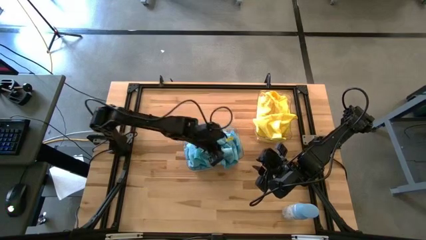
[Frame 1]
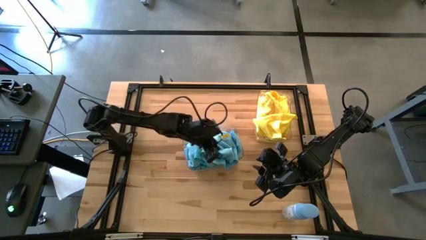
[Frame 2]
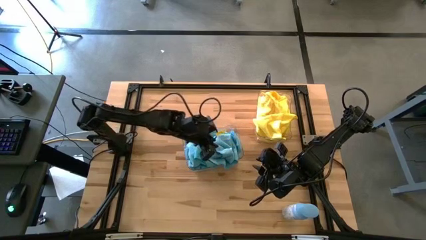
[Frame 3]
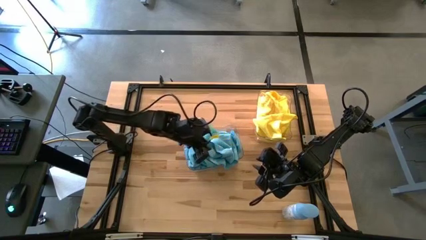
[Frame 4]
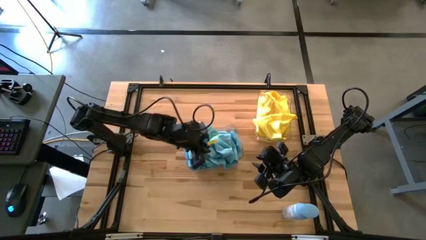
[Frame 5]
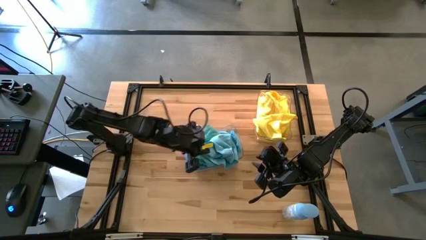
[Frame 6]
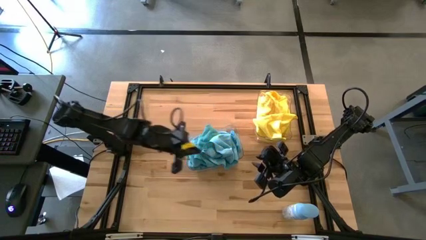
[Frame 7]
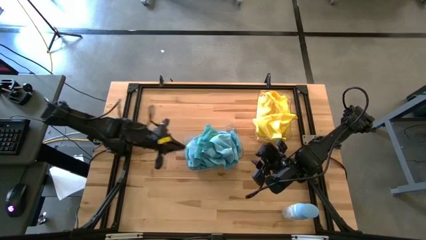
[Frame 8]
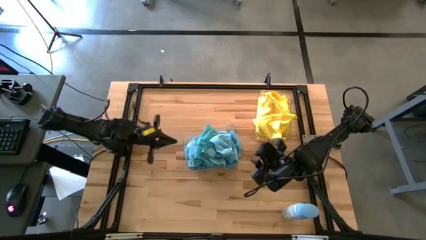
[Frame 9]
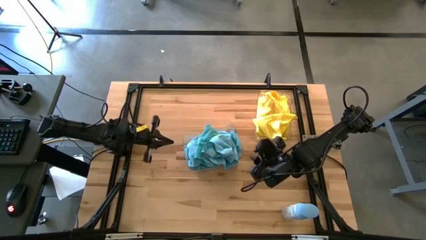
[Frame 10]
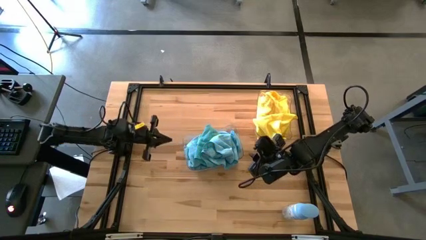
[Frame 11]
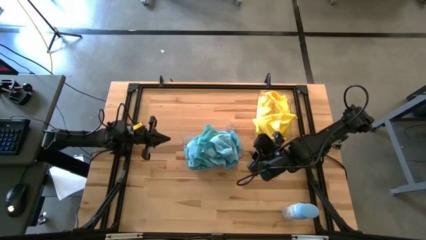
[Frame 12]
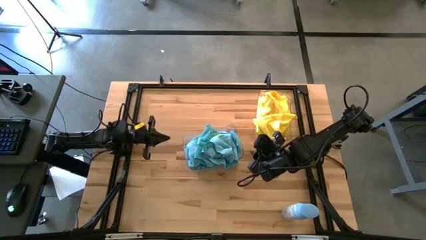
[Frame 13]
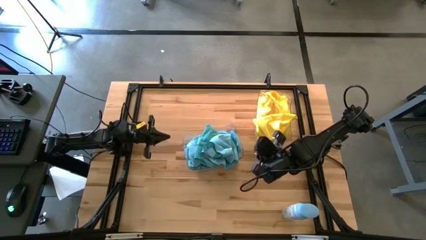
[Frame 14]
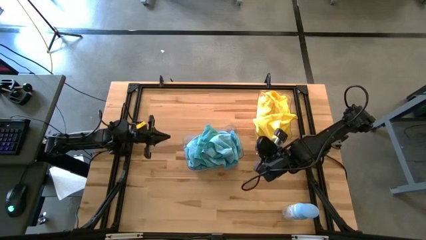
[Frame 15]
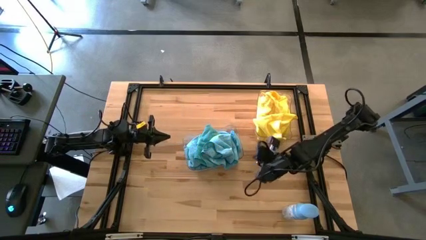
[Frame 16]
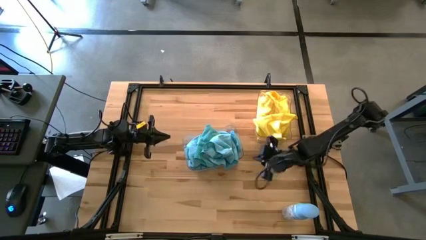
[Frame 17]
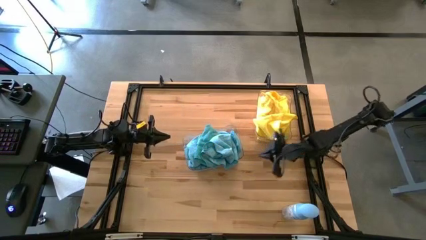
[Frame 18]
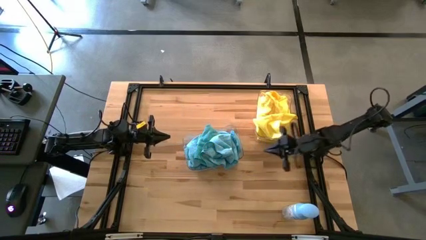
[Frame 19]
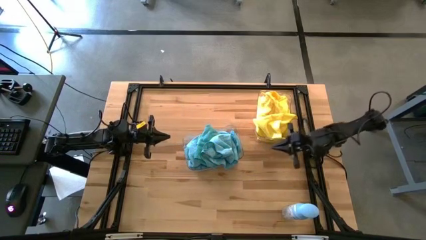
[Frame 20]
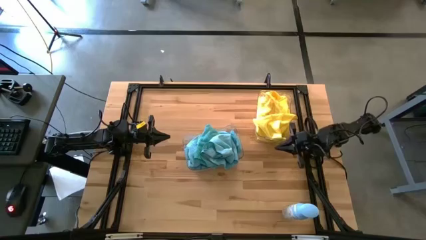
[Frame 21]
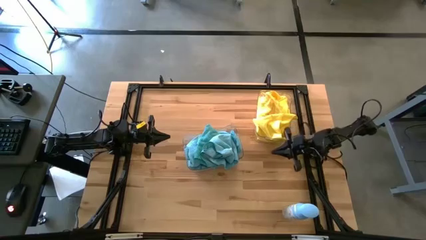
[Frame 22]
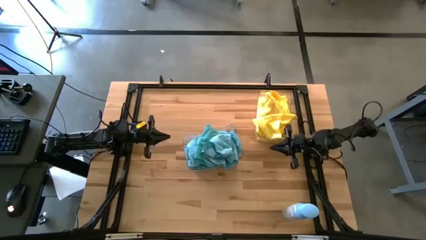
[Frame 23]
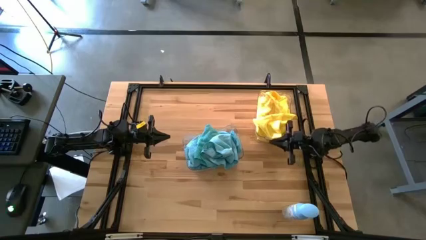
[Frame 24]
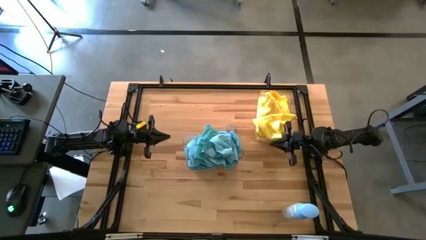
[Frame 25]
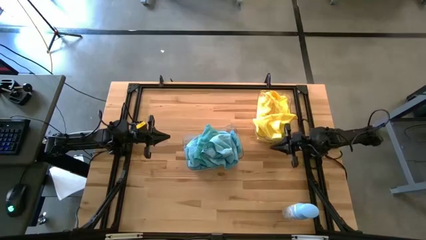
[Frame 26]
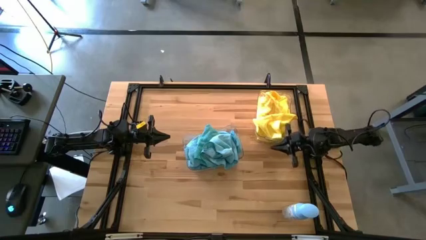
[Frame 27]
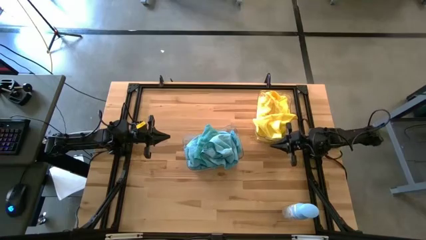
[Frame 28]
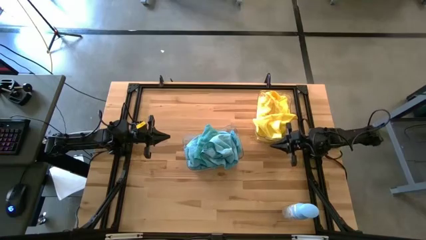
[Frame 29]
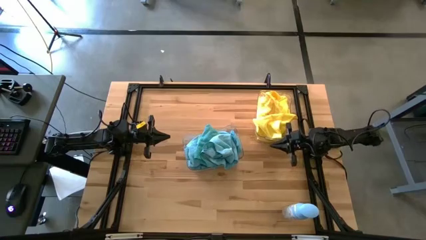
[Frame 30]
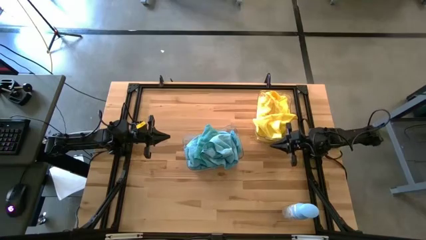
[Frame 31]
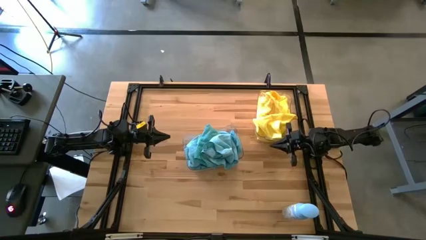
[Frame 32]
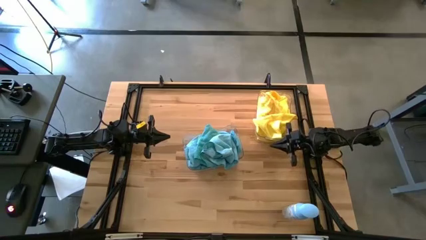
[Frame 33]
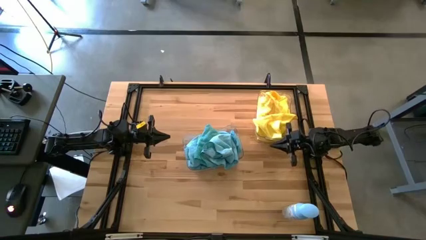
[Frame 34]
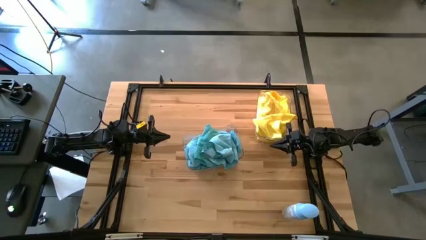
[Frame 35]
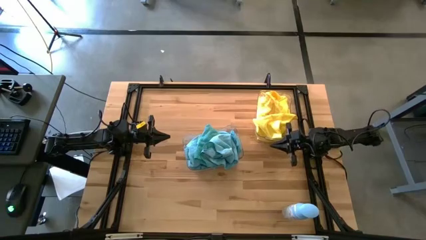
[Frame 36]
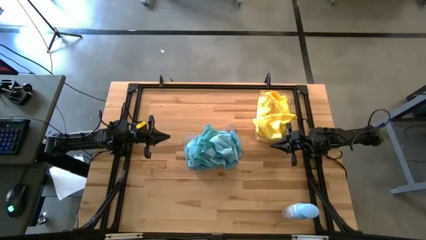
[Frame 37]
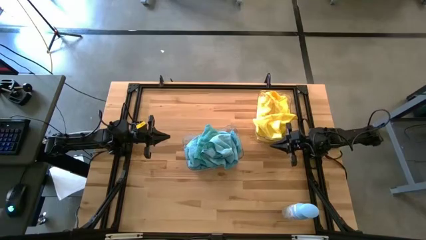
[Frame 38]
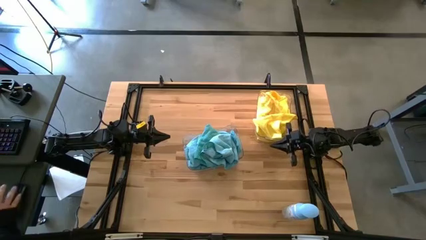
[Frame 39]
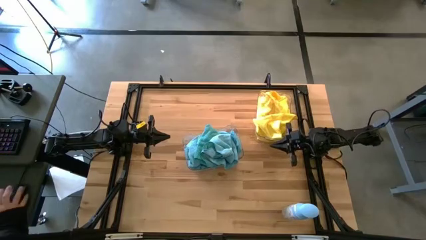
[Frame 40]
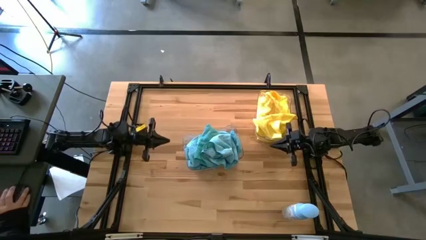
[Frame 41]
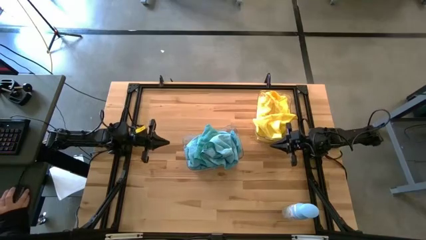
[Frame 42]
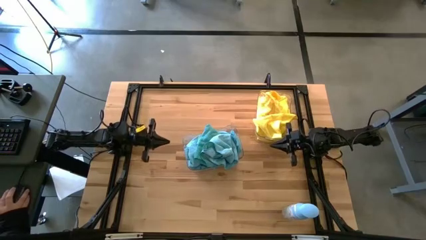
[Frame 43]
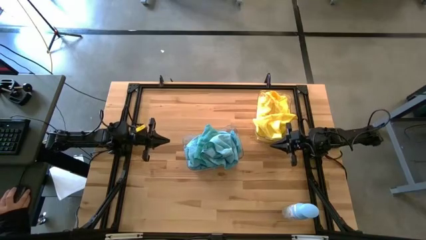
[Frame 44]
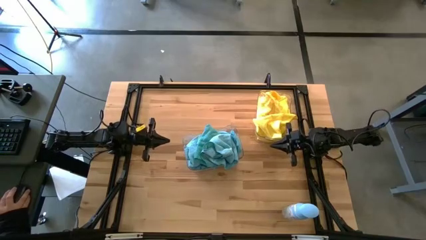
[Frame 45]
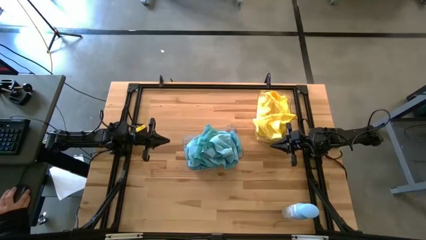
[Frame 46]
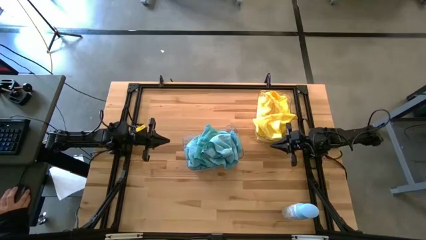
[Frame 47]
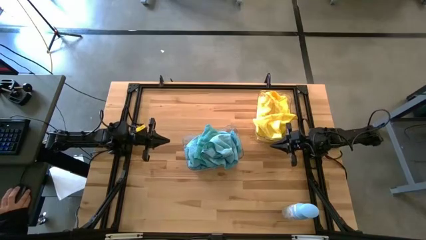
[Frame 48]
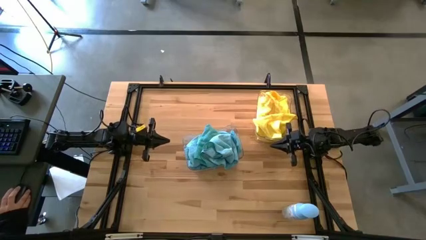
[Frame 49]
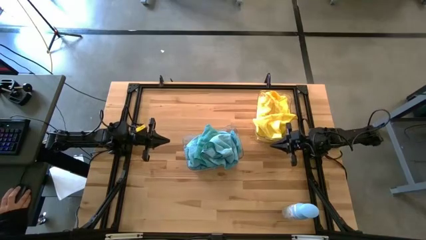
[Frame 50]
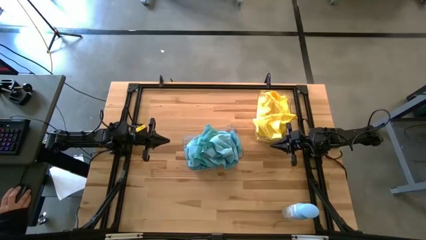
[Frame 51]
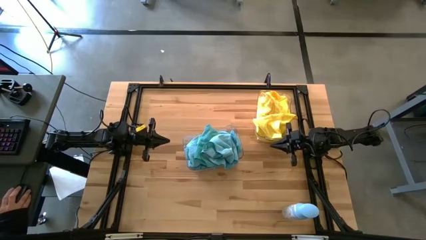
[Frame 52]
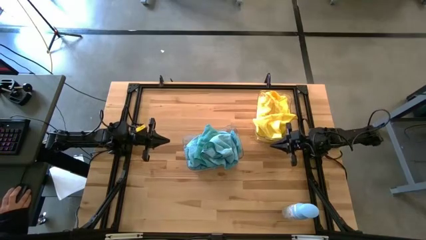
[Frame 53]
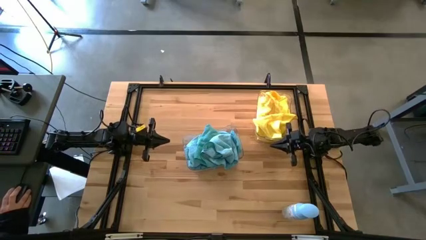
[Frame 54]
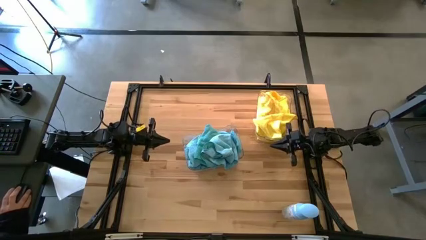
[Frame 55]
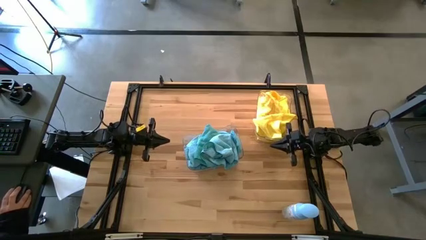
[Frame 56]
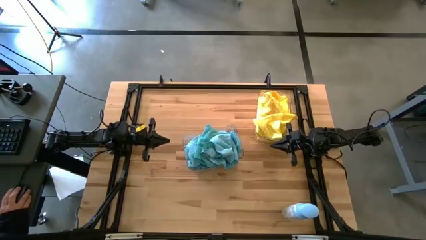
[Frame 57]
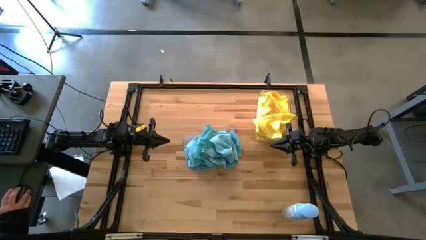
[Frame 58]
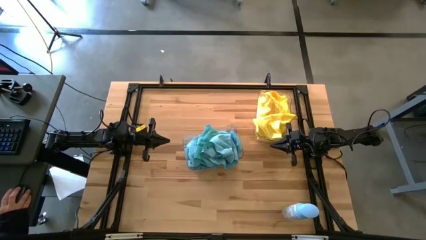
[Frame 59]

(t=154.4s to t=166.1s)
Task: Sort microfiber towel by color & place in baskets
Return to Home Position

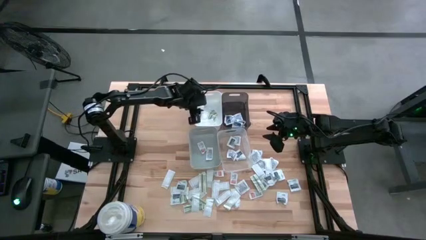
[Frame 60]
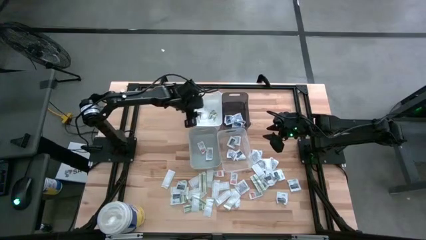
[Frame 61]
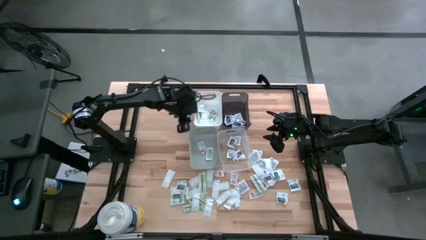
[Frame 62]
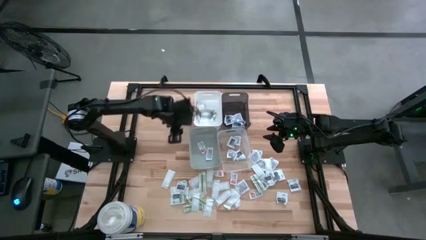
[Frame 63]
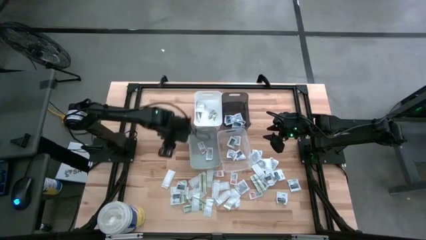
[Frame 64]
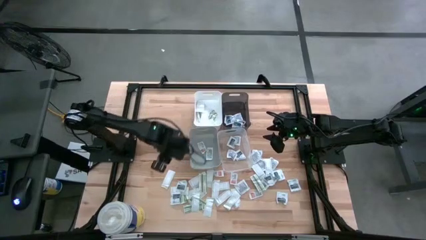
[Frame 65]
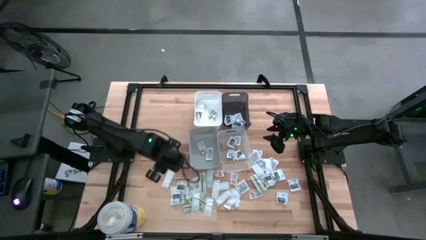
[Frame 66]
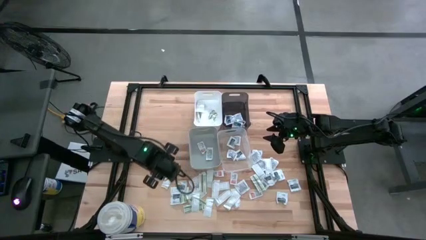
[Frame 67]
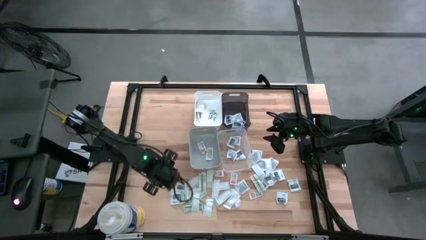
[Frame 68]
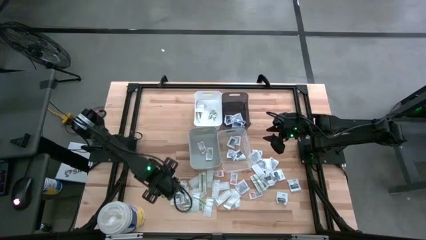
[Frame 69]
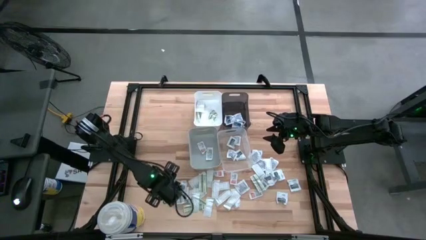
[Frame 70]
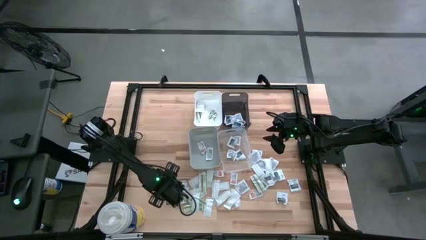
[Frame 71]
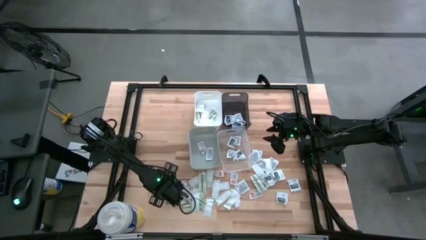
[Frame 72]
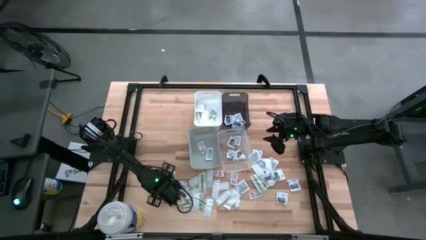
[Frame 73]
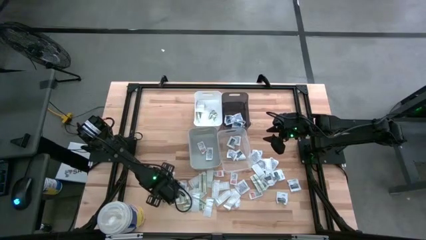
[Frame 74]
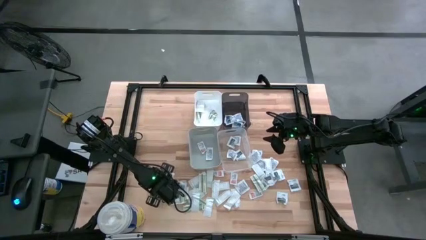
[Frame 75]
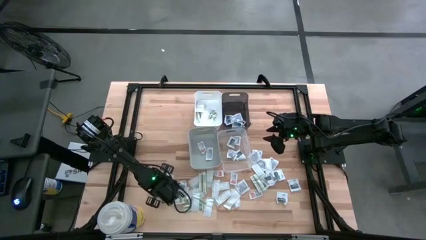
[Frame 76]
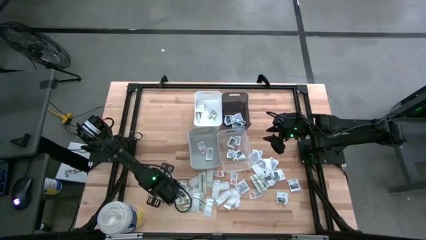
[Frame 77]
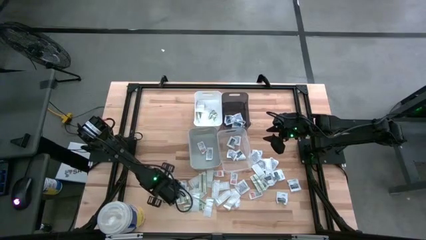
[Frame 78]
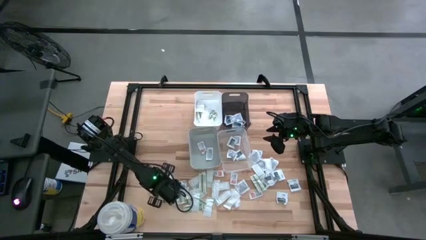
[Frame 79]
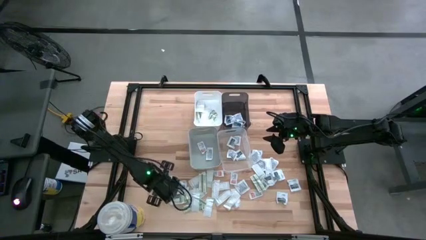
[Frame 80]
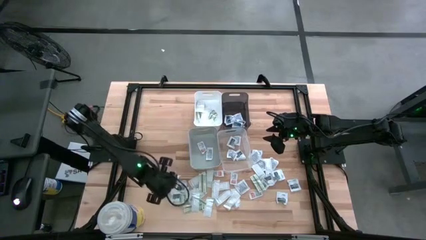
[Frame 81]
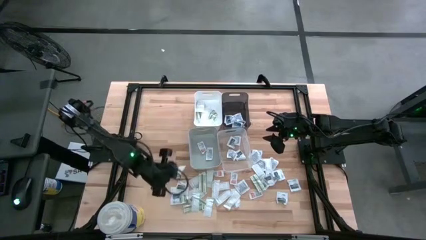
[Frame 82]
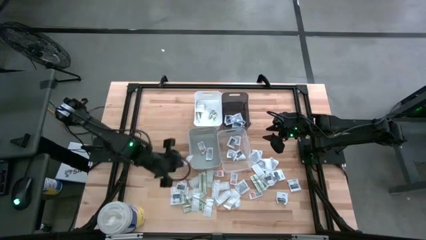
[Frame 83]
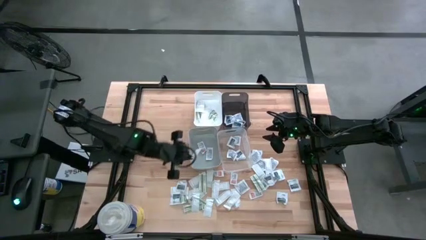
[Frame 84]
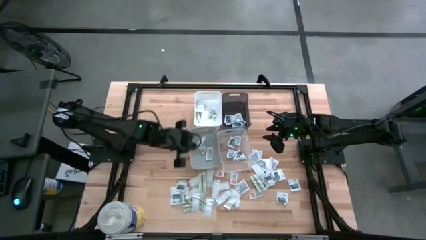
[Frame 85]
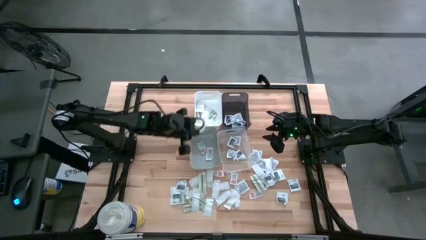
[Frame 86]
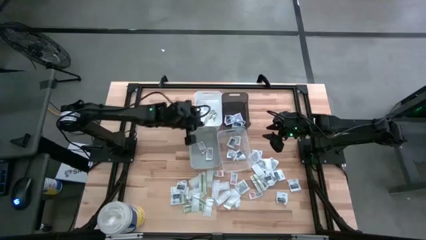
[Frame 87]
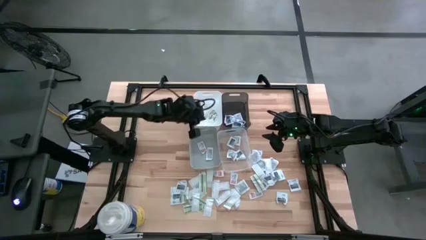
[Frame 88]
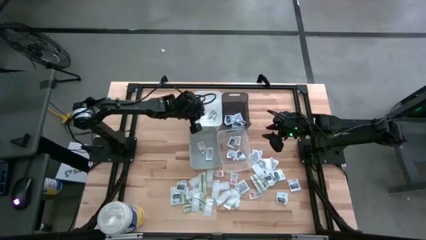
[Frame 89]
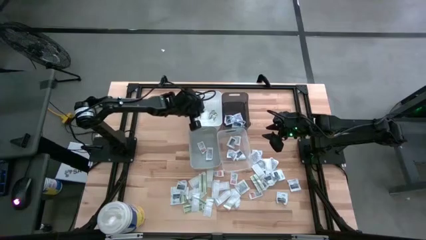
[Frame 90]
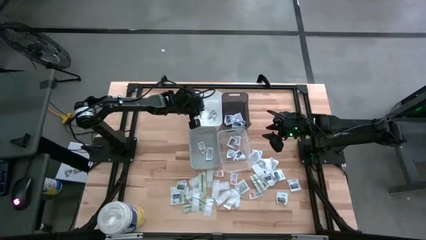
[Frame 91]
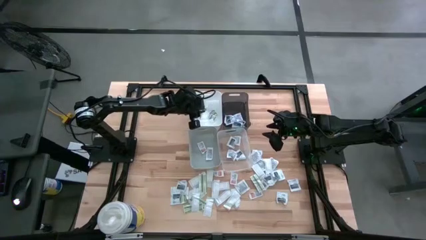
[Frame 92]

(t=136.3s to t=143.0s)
Task: Pick & Place First Aid Supplies
Put the green bandage pack into the white bin
